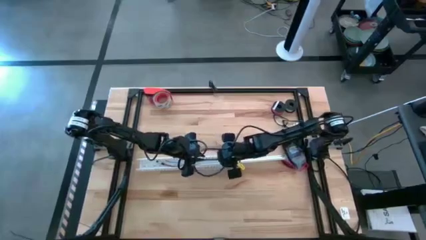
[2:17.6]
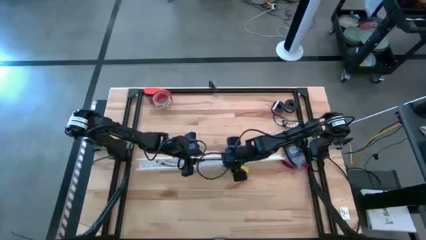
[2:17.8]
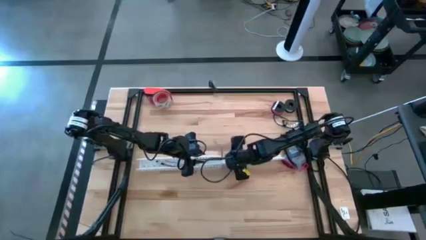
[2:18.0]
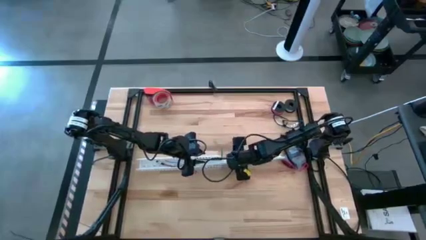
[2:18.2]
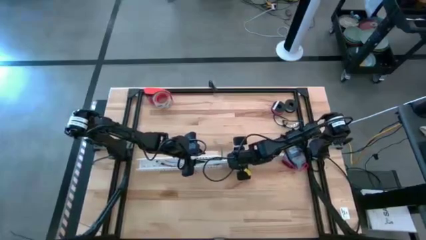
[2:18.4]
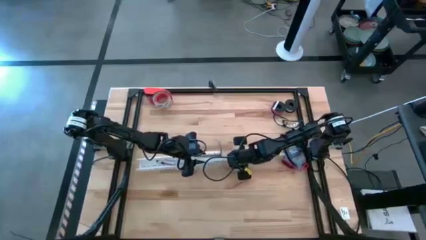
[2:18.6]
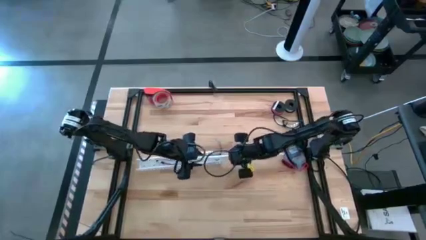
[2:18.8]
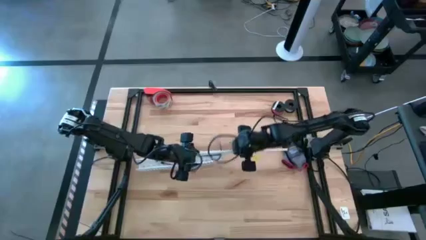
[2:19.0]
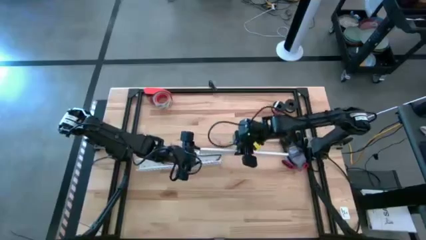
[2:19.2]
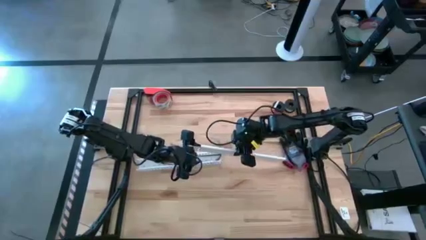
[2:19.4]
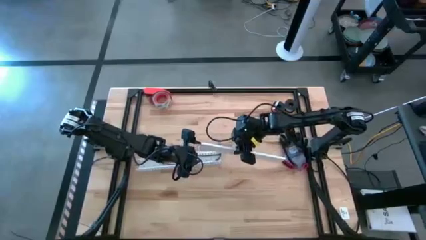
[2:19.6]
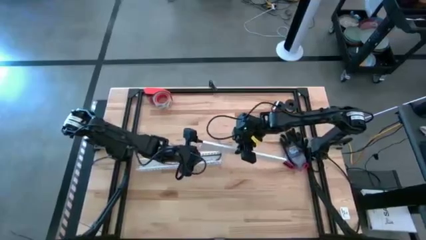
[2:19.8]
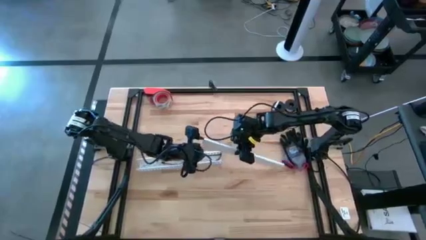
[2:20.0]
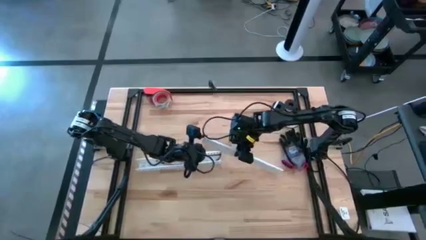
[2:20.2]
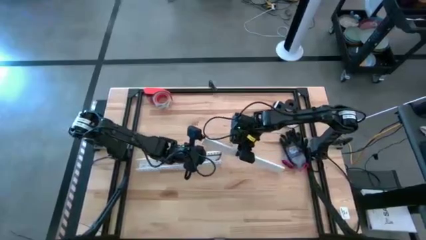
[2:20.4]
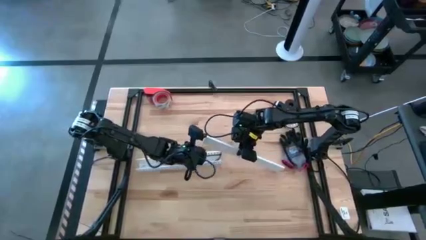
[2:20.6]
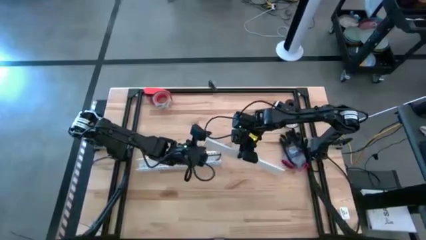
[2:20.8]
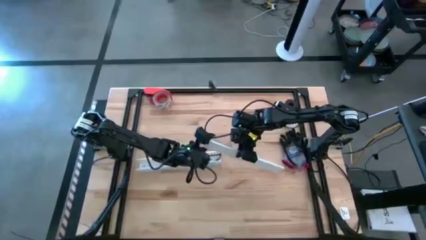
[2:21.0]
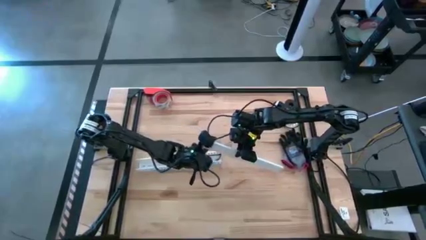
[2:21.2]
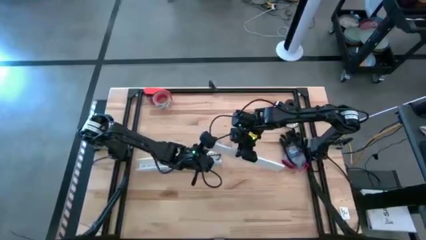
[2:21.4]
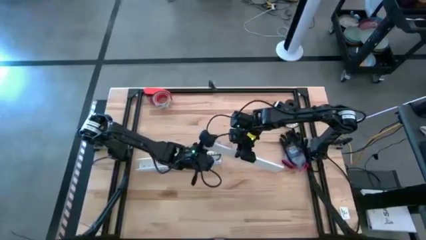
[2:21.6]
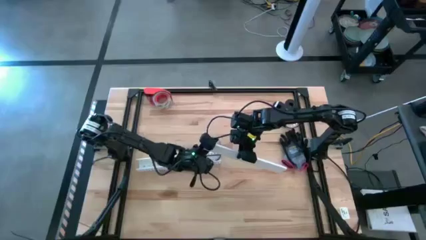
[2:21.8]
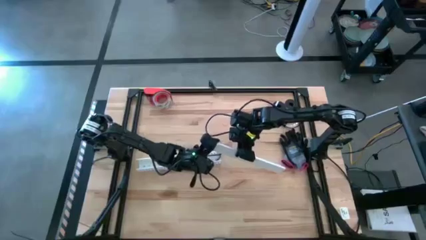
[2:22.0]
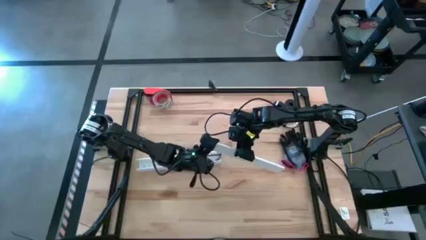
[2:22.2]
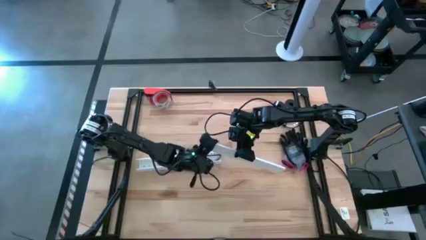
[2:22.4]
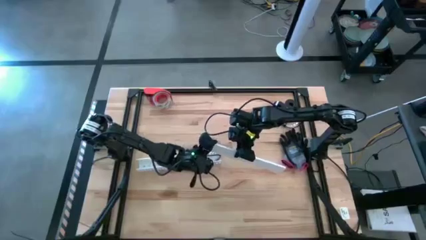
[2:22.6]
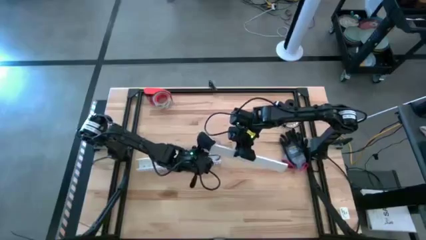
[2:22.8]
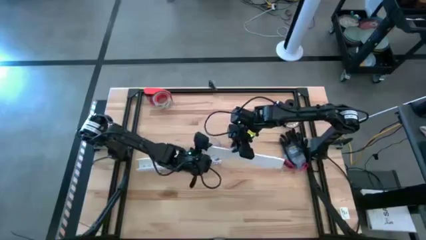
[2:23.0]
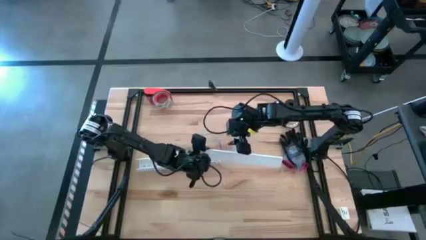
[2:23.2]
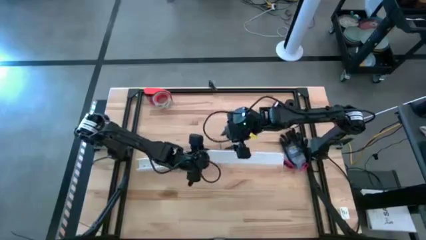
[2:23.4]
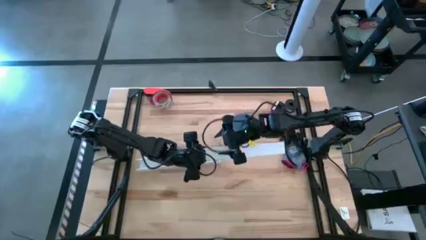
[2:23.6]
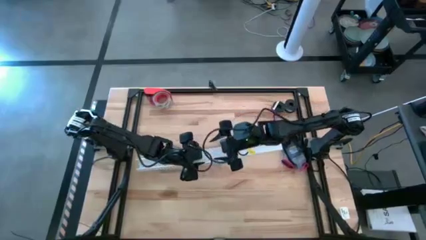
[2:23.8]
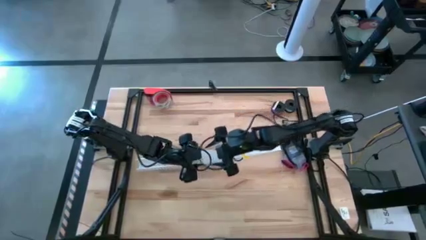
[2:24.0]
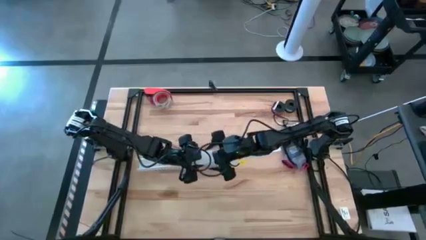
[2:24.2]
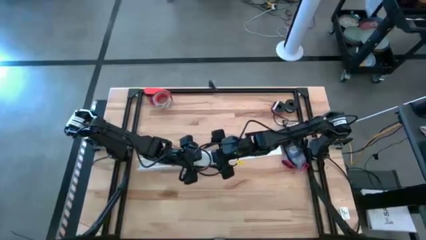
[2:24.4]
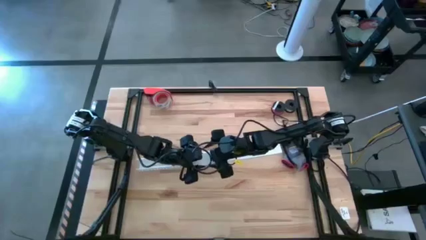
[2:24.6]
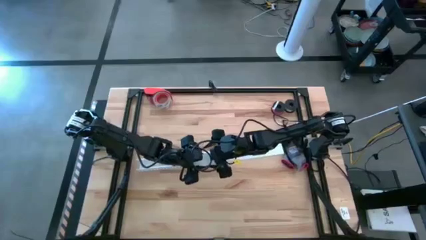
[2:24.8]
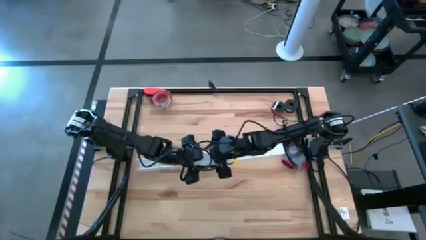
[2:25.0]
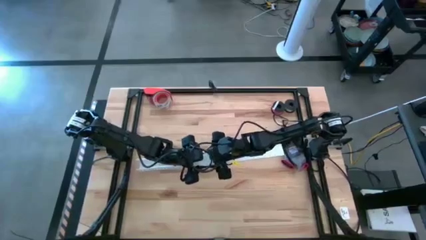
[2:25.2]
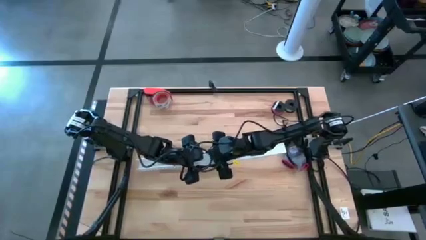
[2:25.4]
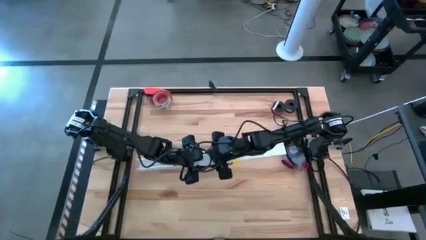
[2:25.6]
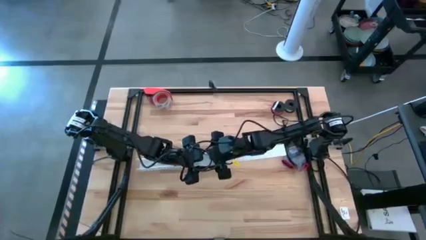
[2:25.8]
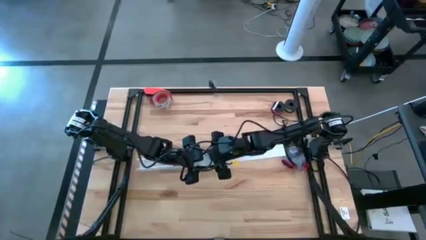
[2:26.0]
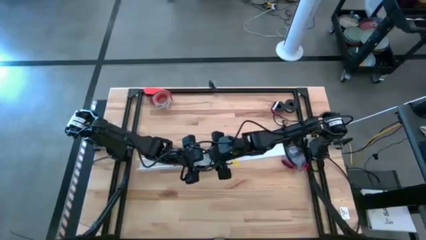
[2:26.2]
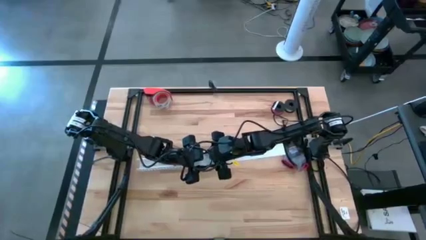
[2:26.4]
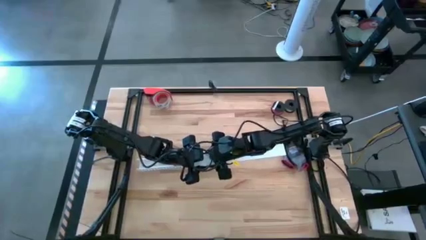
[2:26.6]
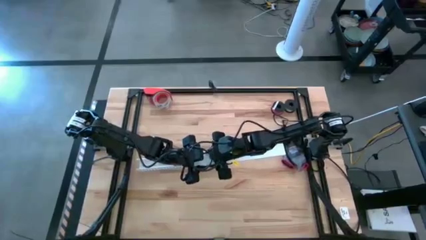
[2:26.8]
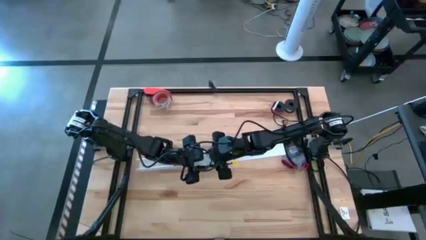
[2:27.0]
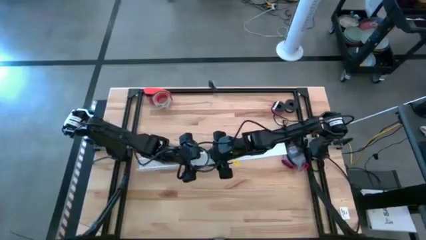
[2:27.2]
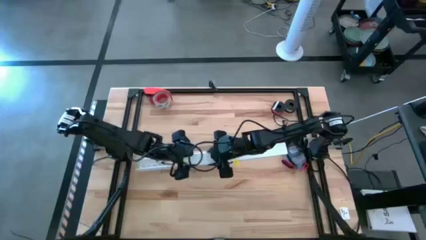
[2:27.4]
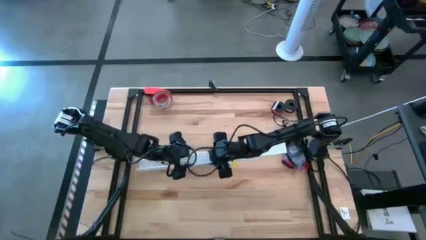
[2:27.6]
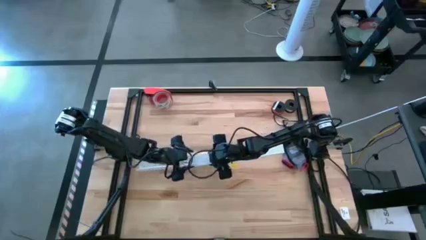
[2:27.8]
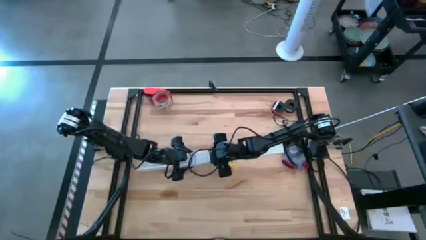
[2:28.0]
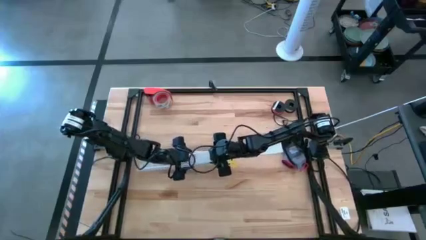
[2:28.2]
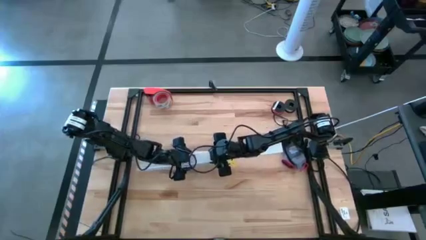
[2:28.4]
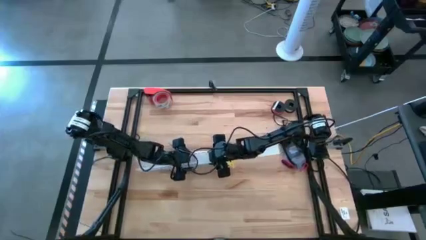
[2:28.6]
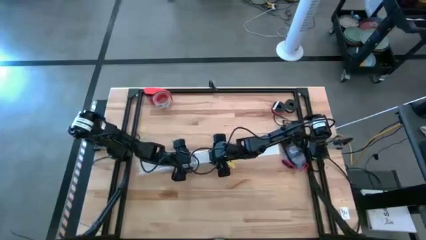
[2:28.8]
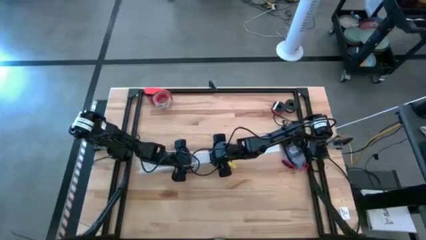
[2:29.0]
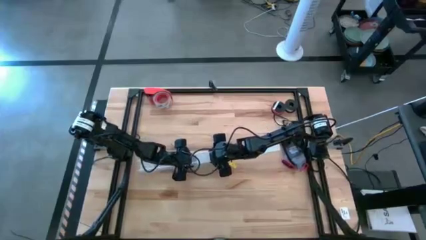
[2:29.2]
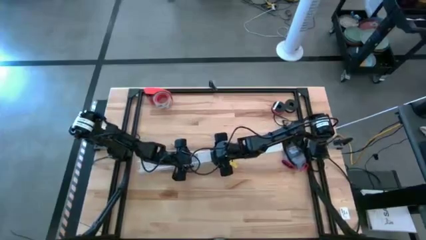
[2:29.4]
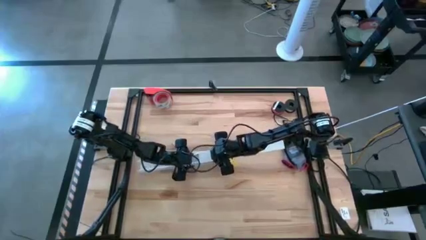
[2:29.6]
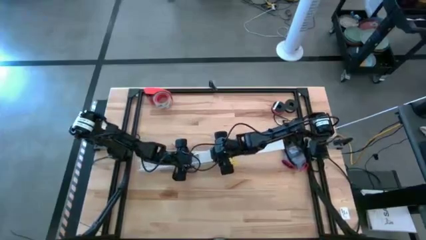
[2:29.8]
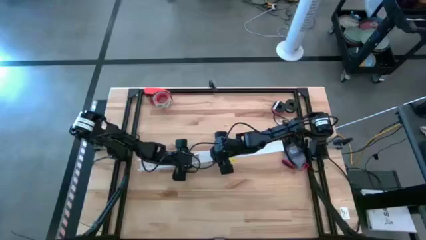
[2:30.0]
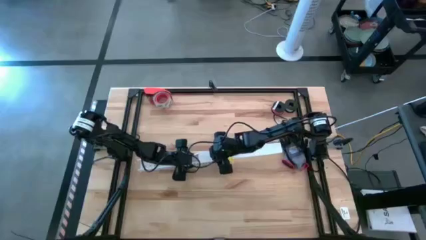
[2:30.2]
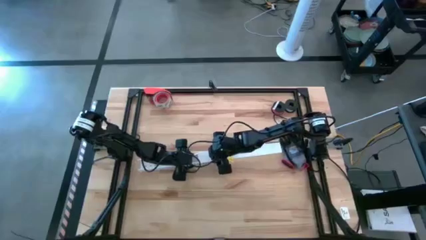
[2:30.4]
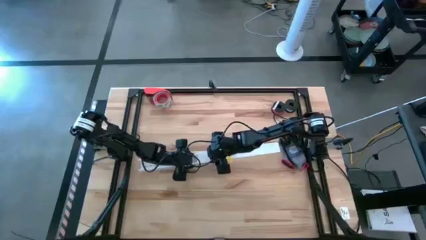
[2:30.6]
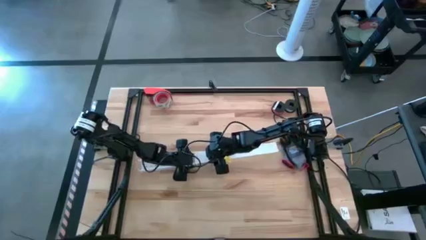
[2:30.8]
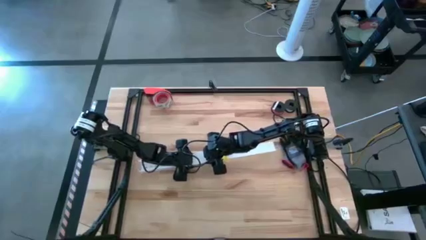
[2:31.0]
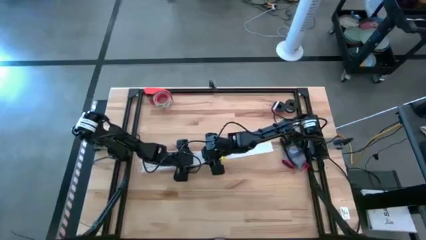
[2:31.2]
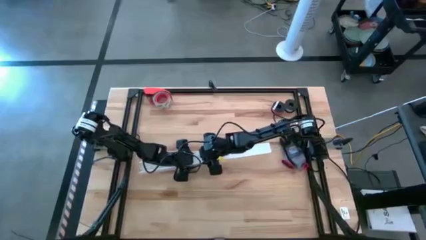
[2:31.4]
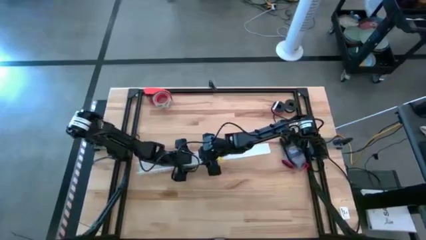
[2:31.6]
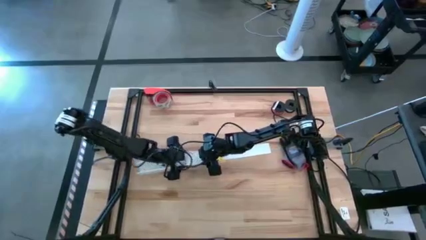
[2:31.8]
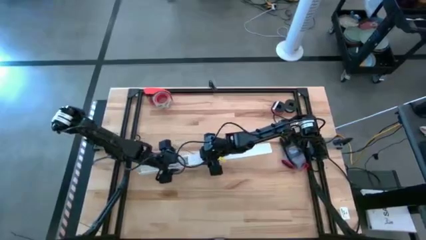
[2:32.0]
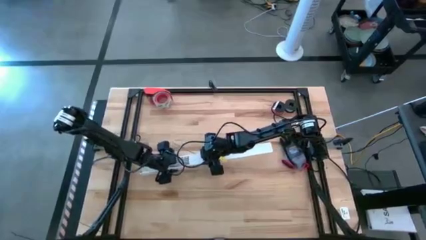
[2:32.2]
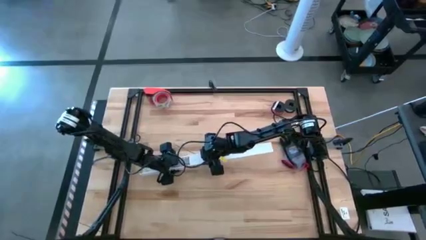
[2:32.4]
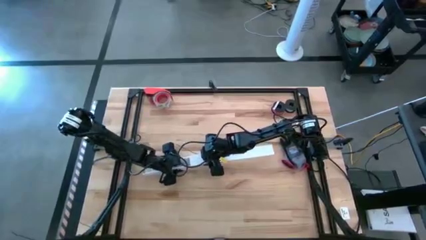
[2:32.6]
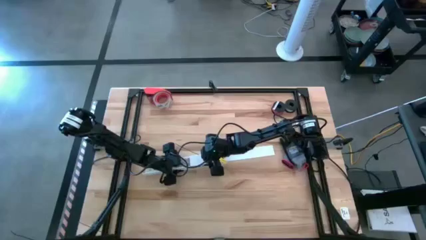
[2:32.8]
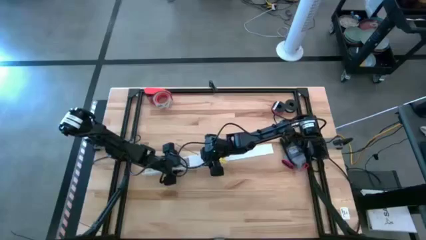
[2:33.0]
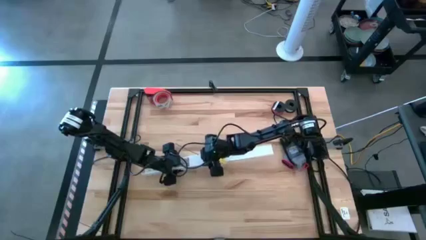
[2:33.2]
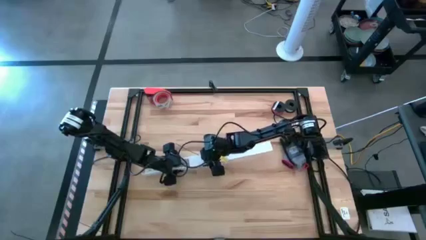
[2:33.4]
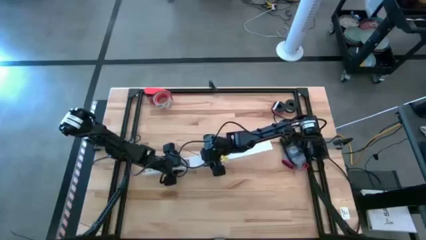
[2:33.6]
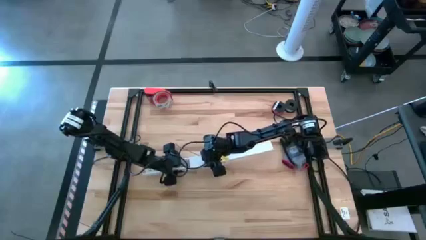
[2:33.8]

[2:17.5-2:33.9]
Task: Ziptie cables
Close the white cable duct
